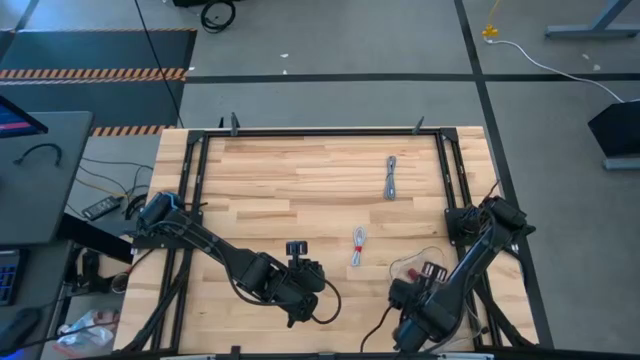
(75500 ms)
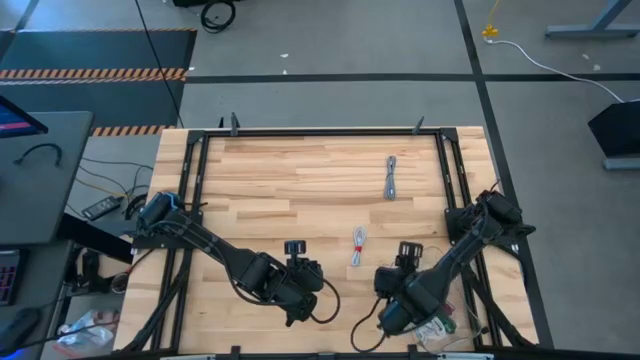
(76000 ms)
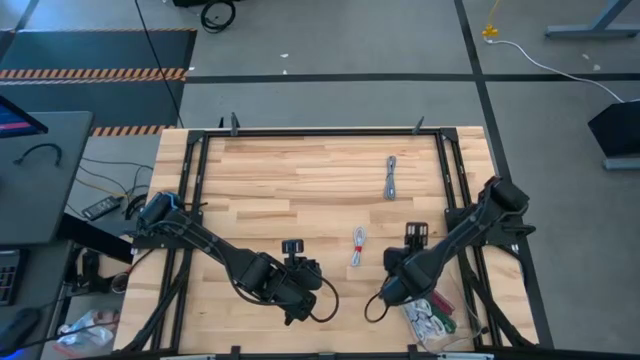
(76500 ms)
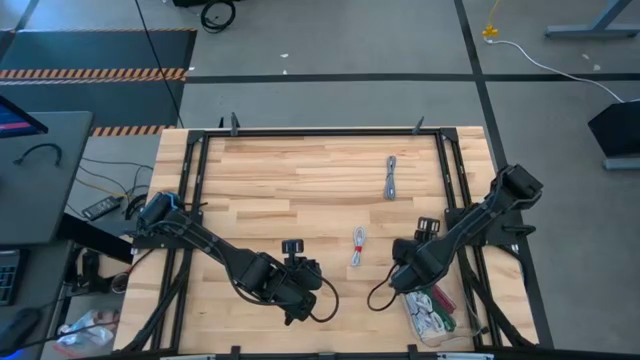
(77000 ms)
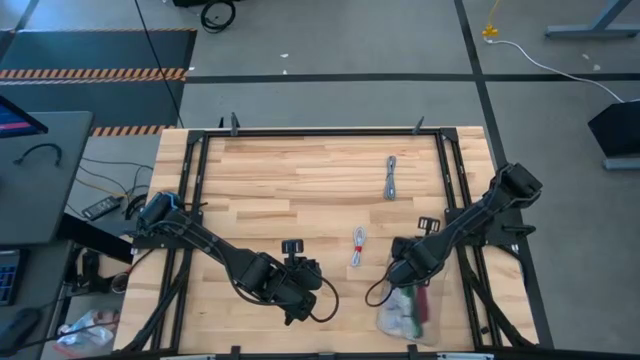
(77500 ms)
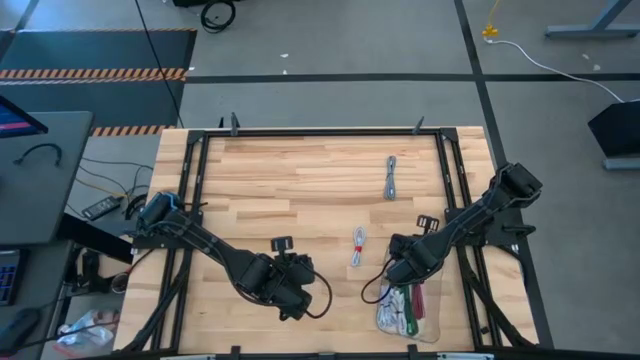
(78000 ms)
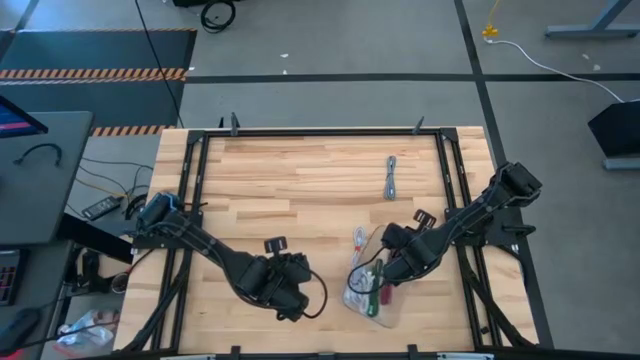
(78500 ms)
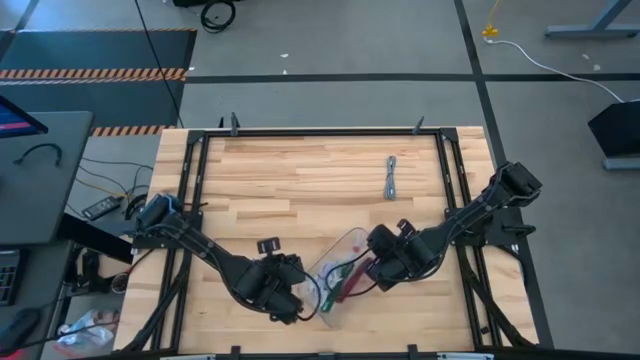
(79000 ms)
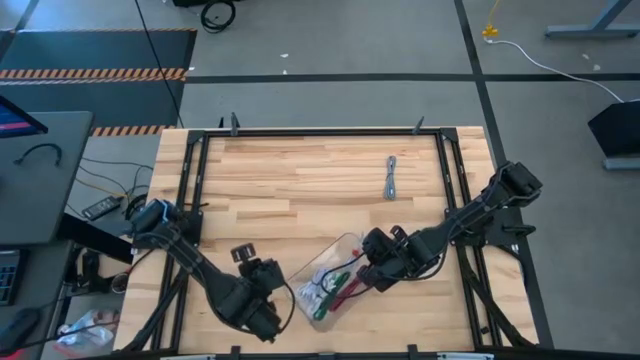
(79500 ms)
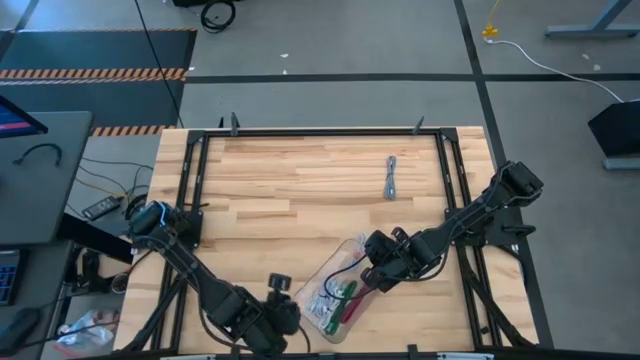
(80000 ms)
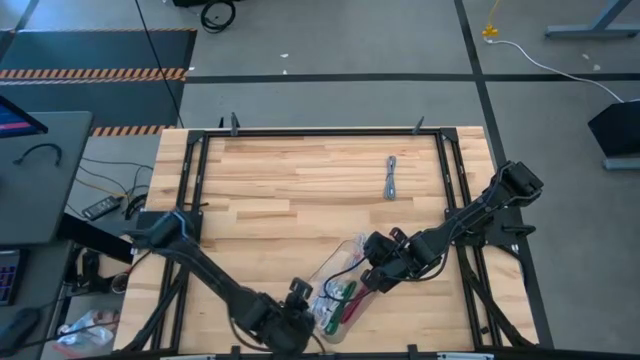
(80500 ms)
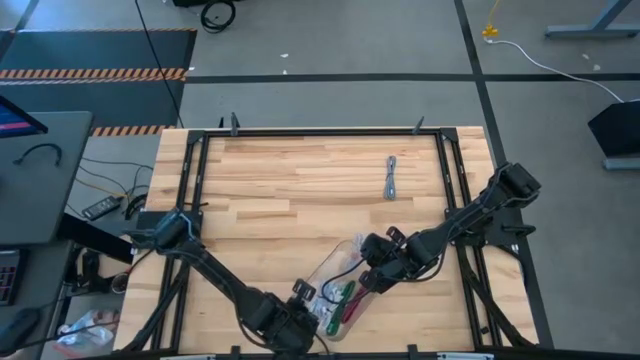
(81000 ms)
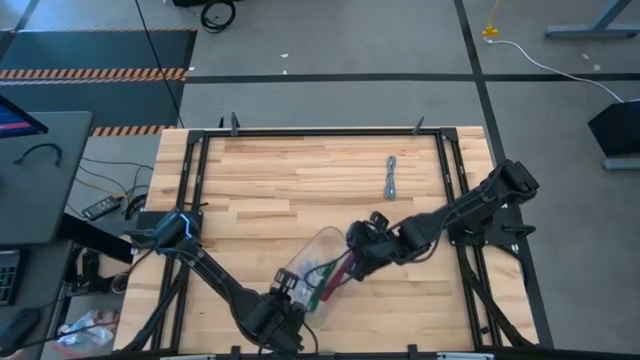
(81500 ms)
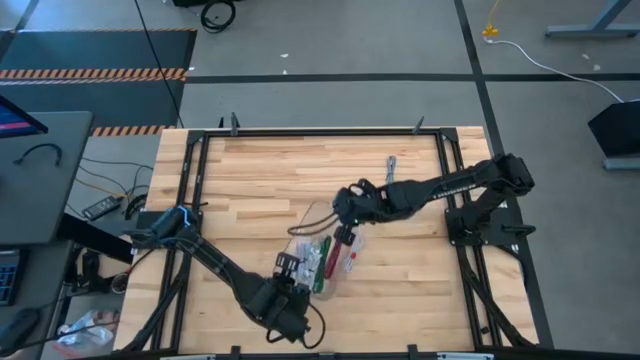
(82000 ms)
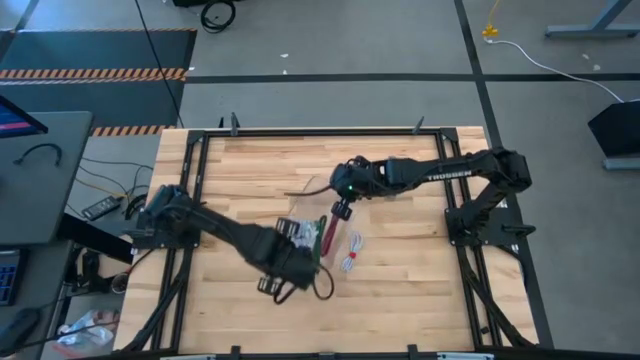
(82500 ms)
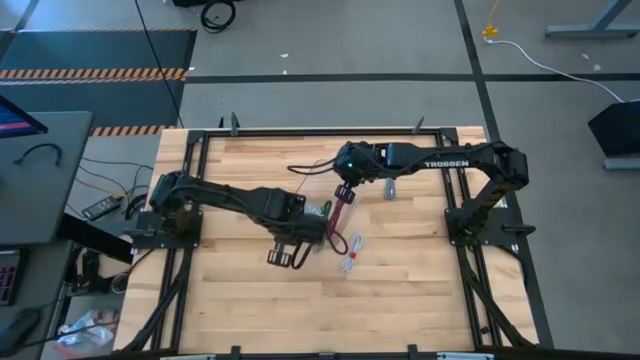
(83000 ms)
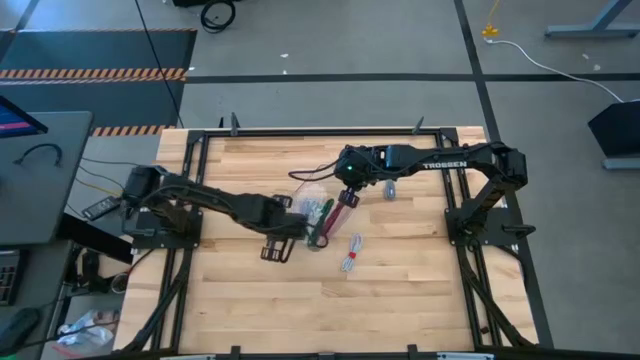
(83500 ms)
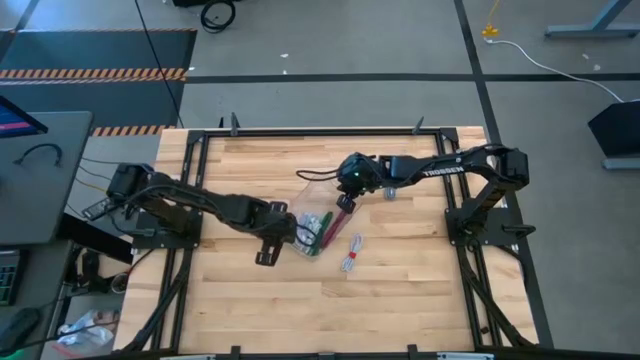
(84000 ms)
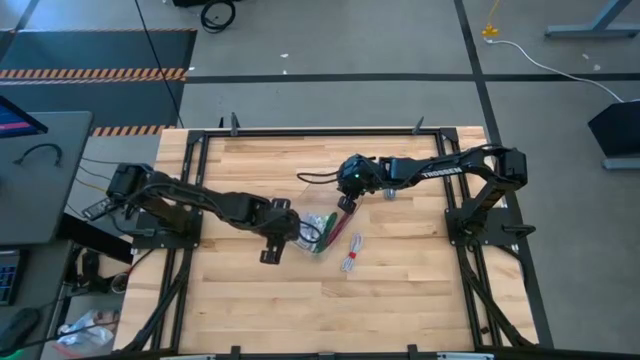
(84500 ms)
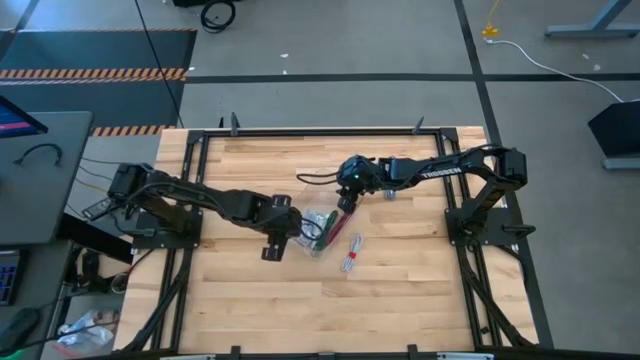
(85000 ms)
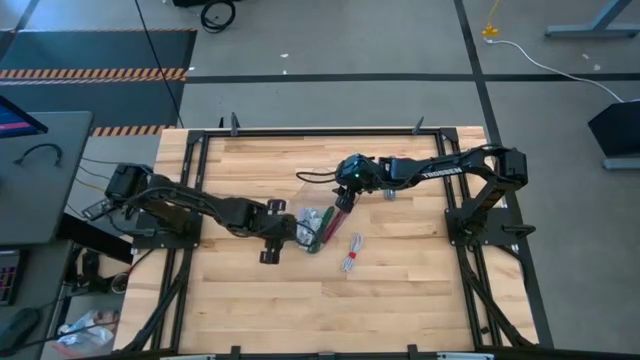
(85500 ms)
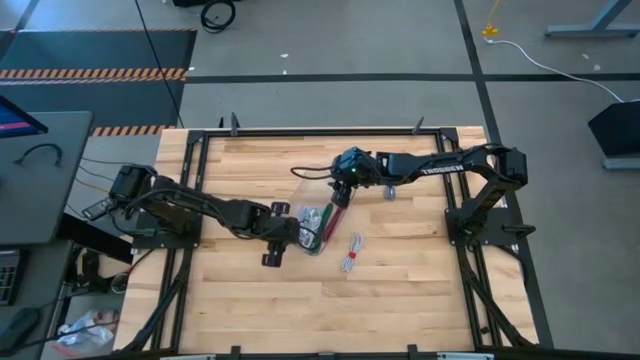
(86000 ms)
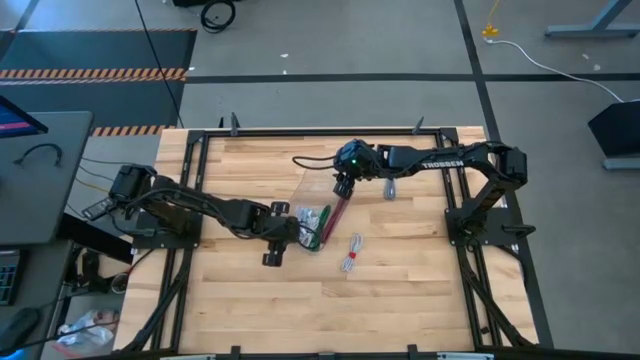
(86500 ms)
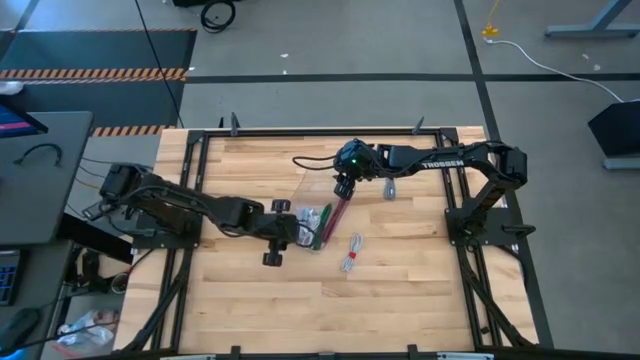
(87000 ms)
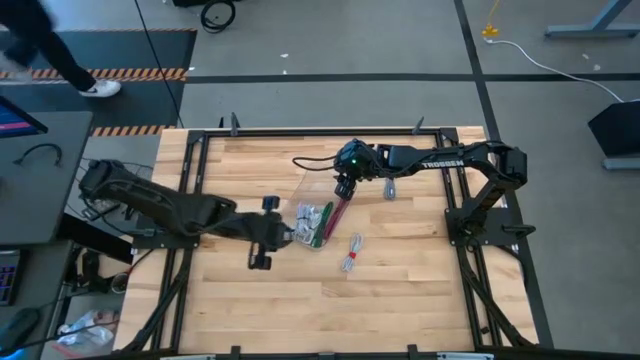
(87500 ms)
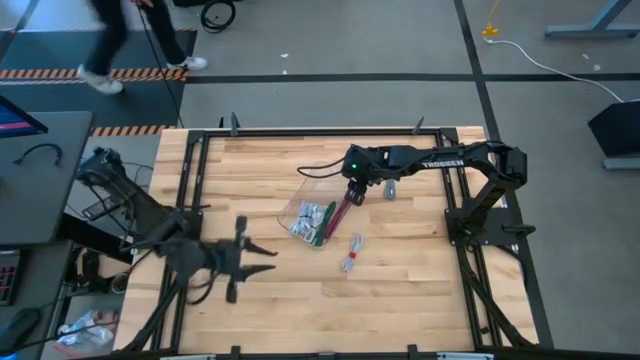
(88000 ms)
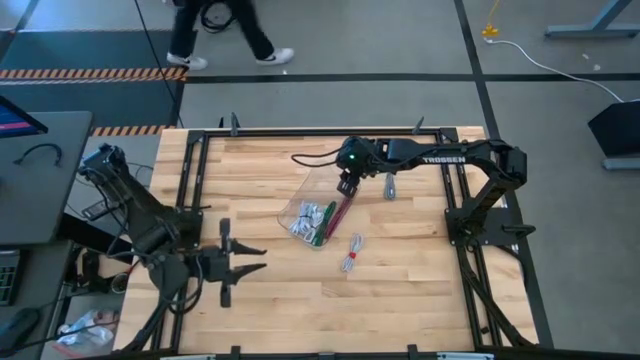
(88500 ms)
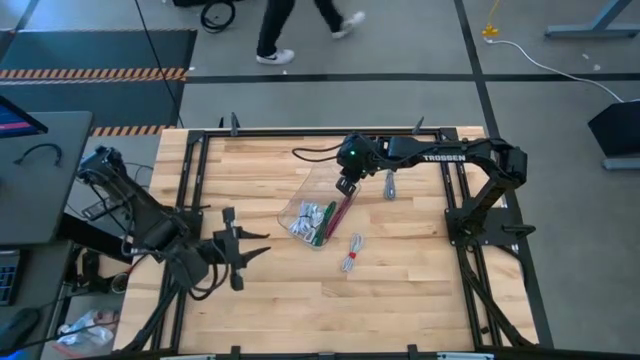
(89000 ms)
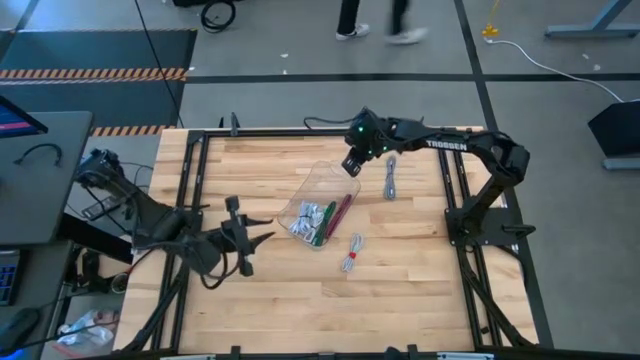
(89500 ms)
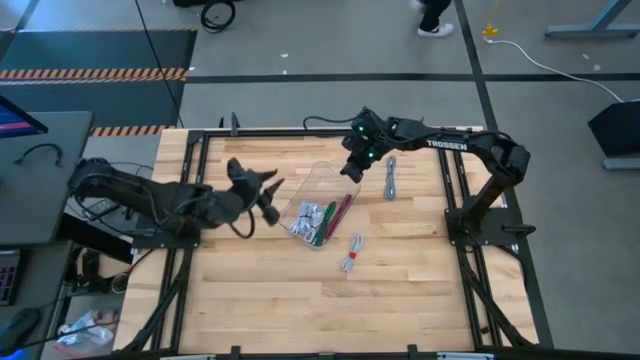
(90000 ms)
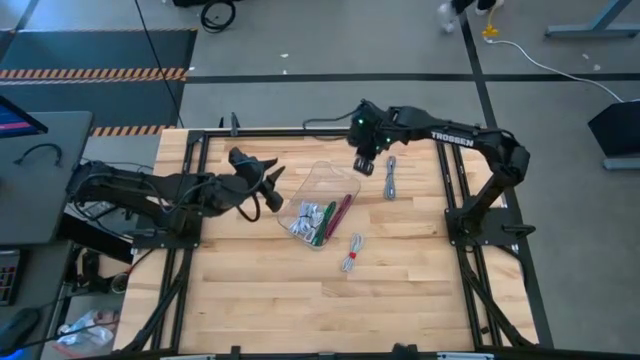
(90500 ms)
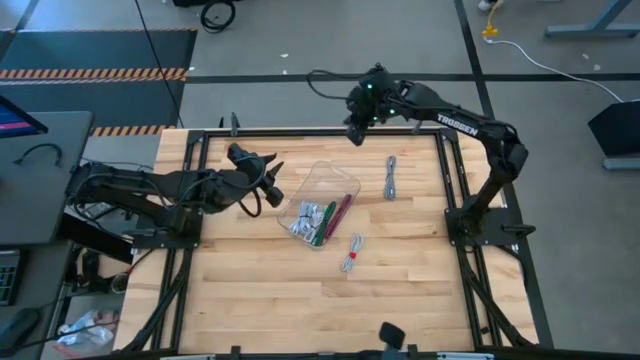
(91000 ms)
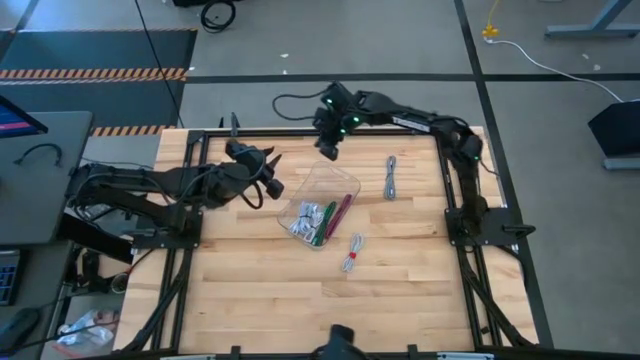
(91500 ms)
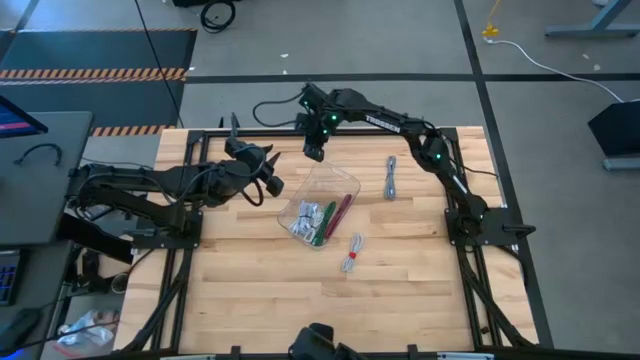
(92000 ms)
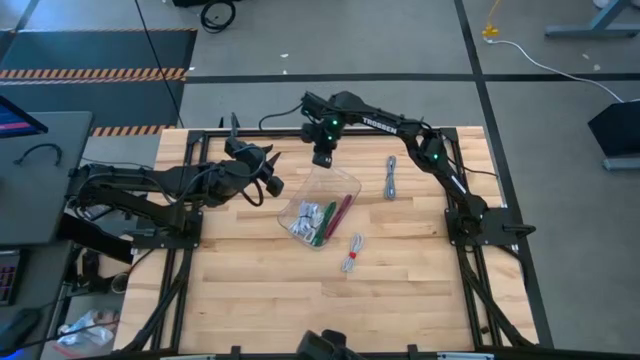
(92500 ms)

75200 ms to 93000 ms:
Task: Pick and place USB-C Cables
Move the transparent bin to the center of the table

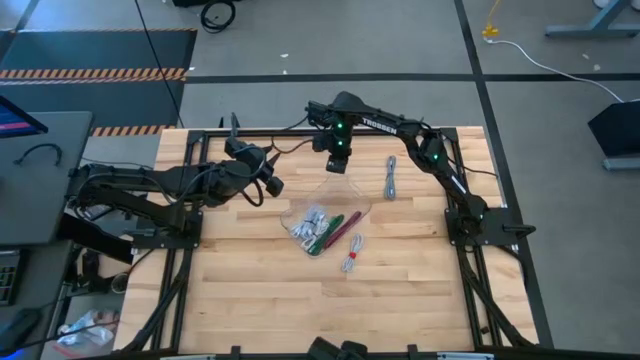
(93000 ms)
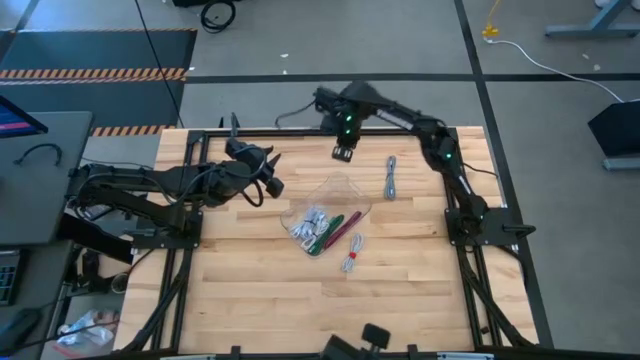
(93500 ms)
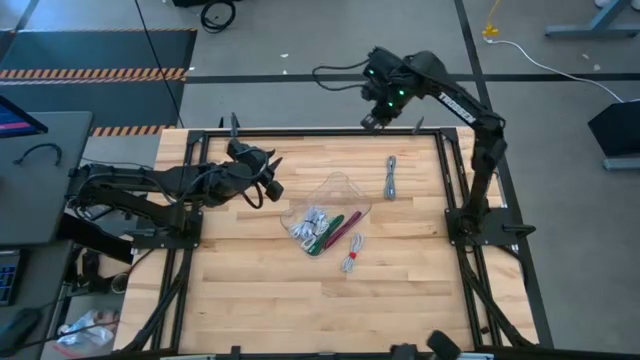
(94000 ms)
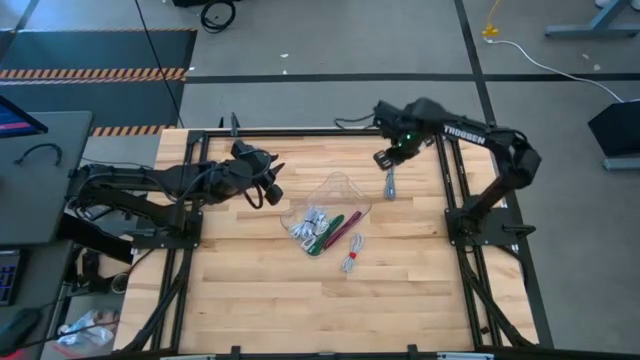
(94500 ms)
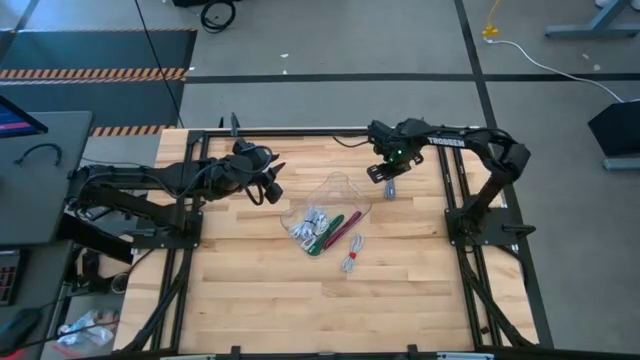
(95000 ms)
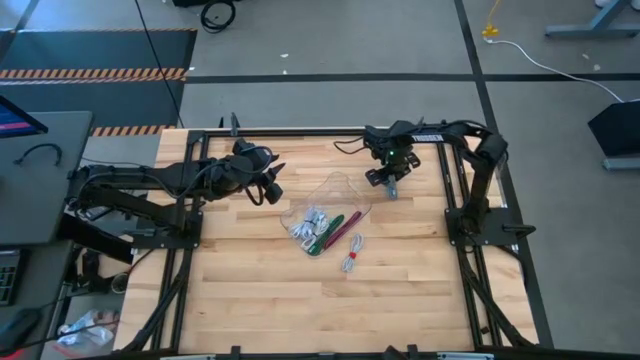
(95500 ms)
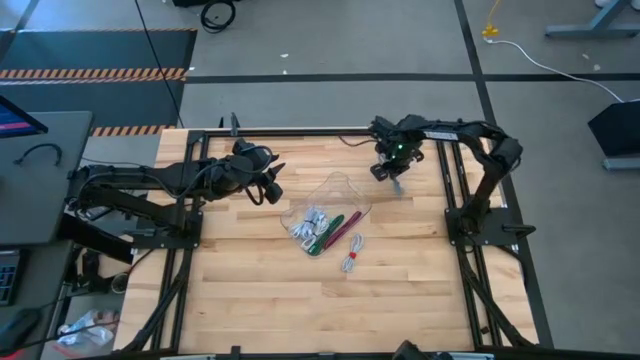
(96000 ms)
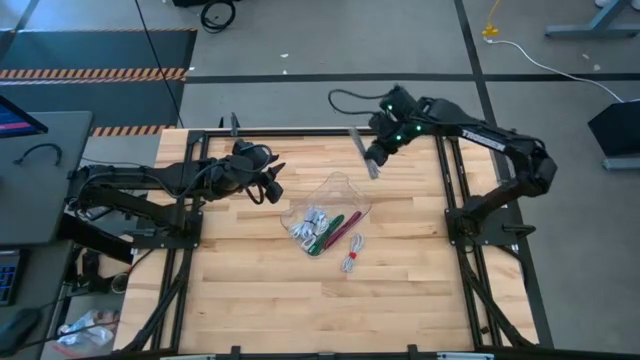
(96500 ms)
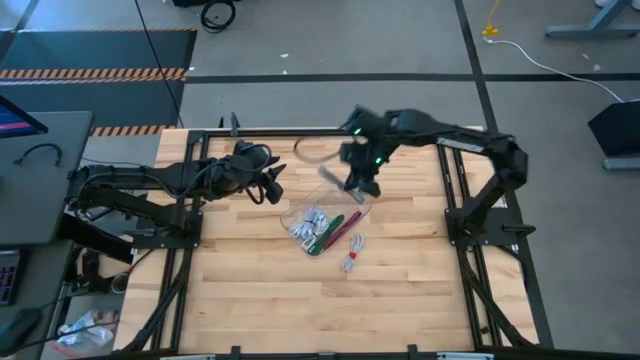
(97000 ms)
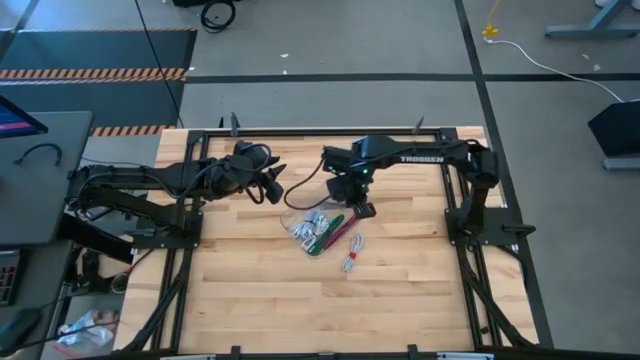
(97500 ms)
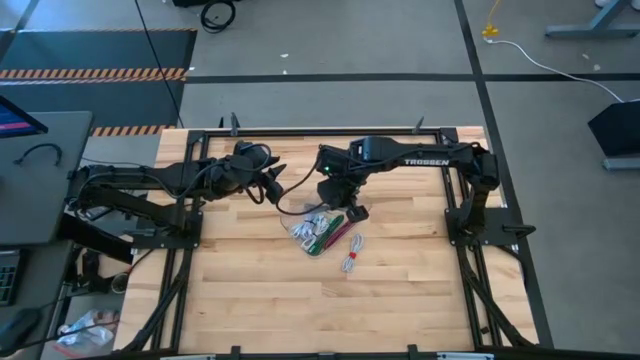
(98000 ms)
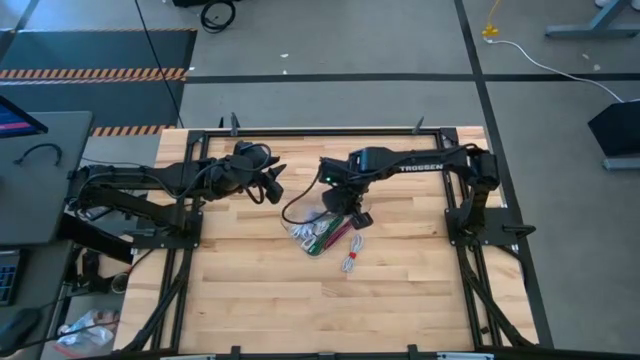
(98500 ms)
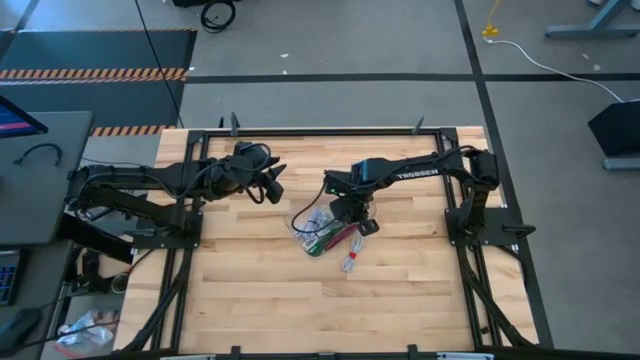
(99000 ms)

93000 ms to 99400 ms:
Put the gray charger cable into the transparent bin
